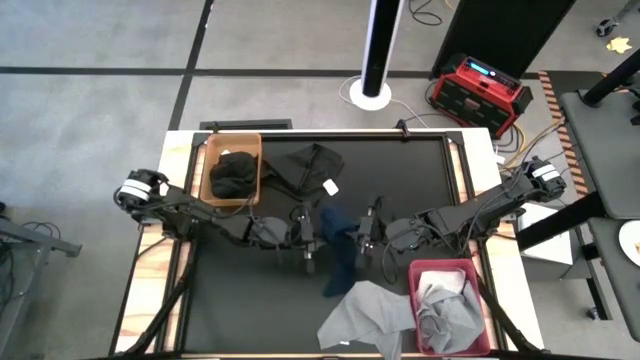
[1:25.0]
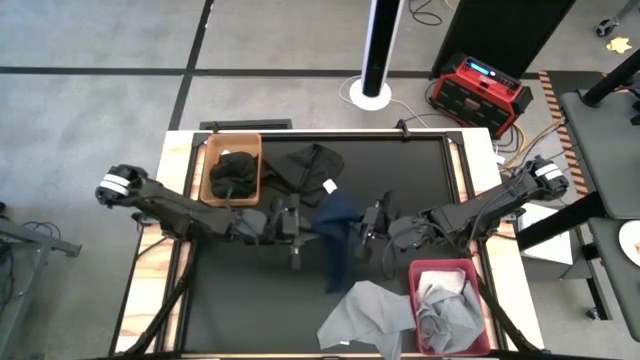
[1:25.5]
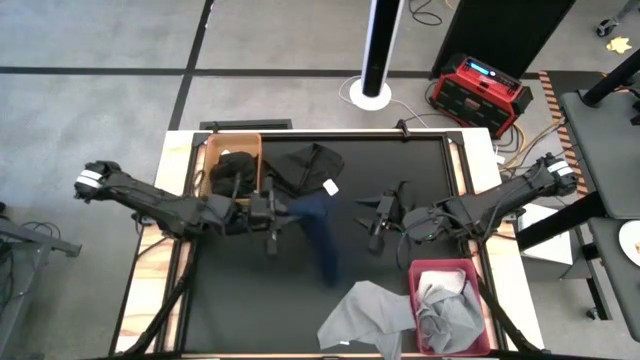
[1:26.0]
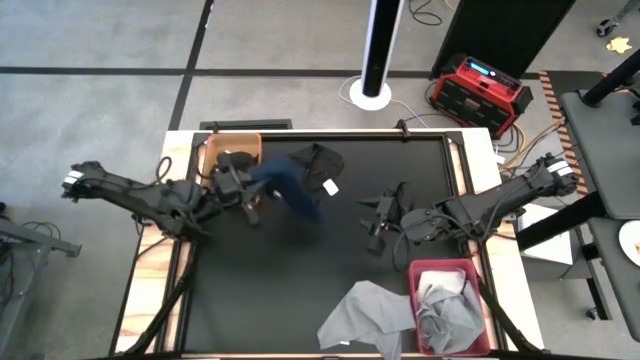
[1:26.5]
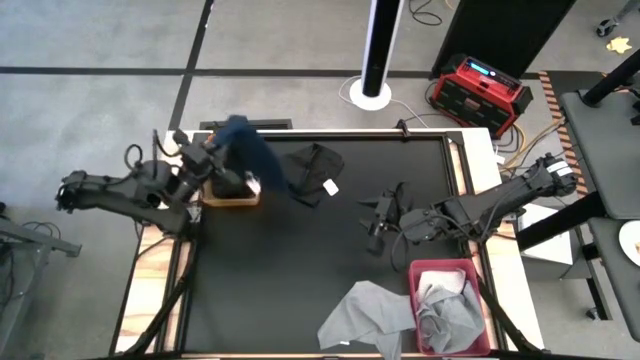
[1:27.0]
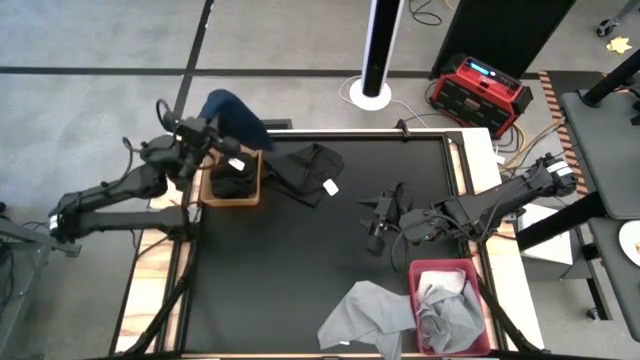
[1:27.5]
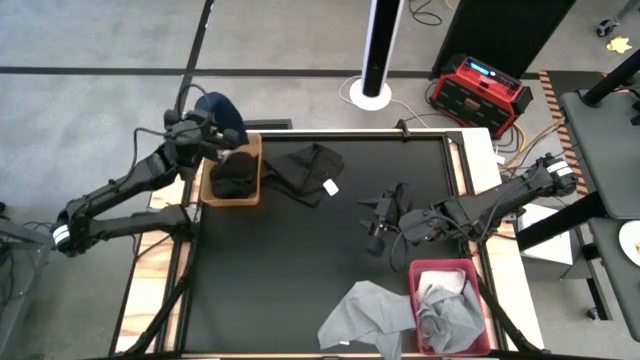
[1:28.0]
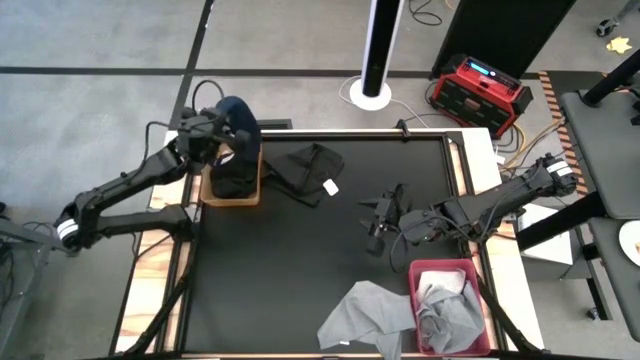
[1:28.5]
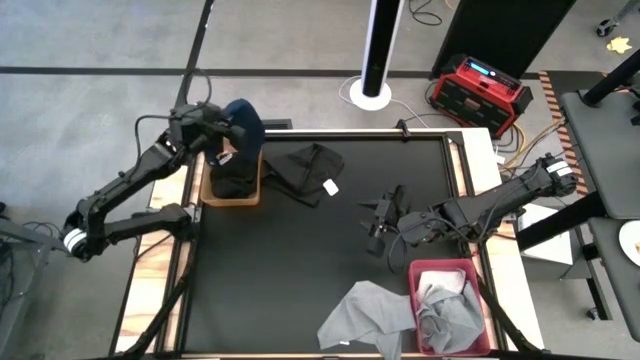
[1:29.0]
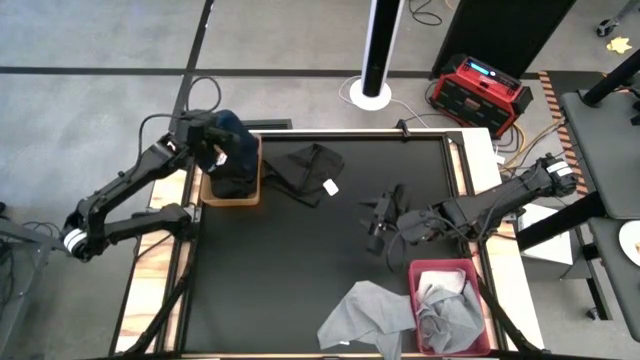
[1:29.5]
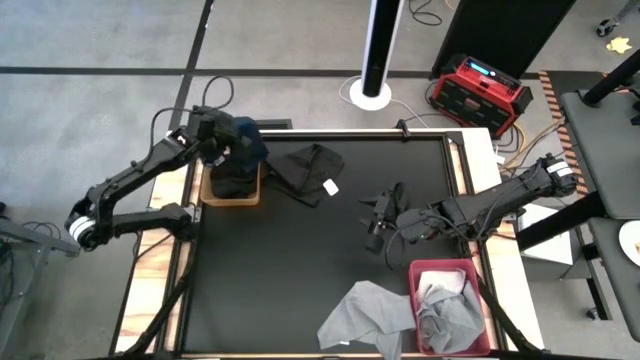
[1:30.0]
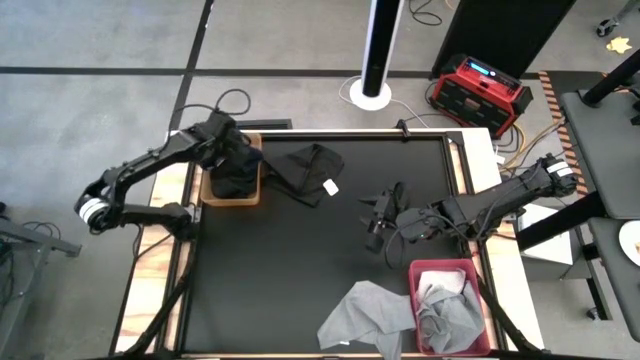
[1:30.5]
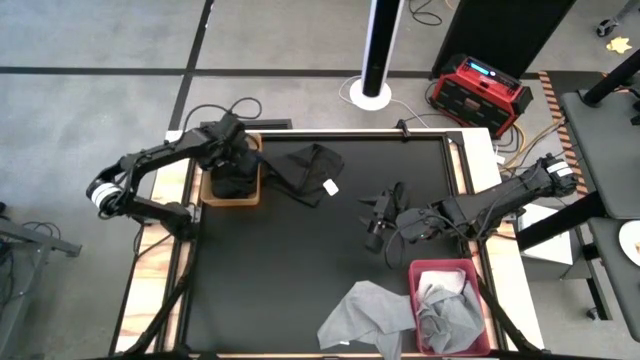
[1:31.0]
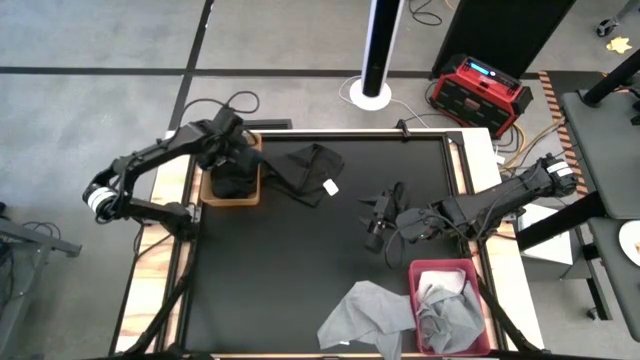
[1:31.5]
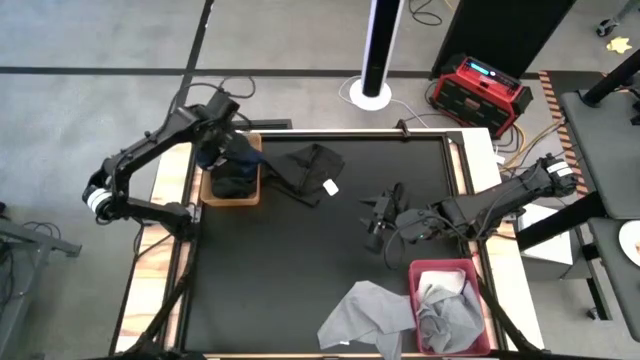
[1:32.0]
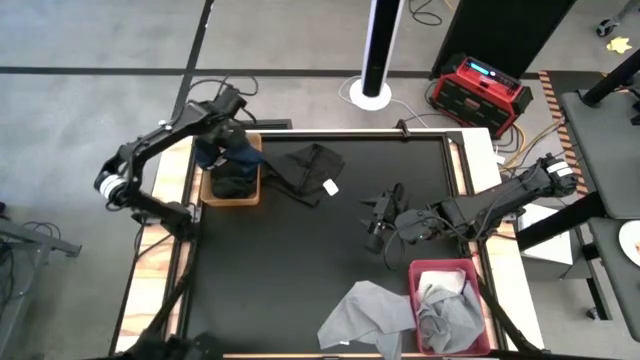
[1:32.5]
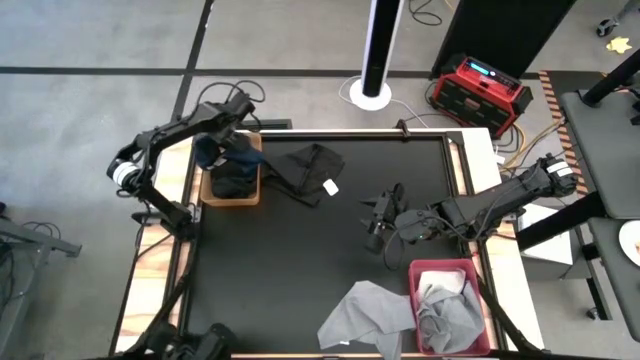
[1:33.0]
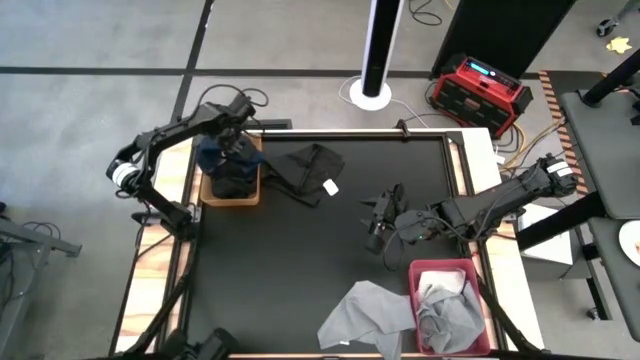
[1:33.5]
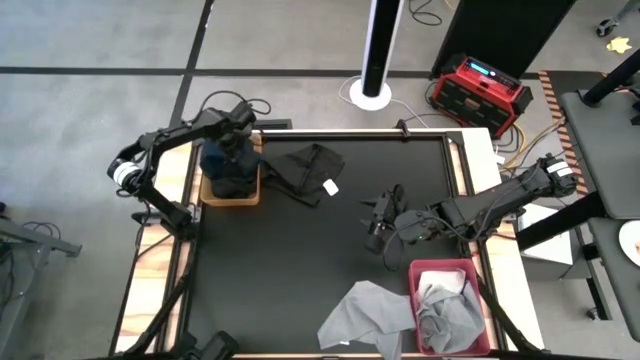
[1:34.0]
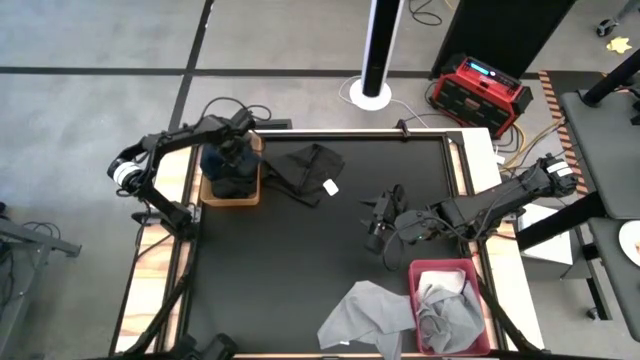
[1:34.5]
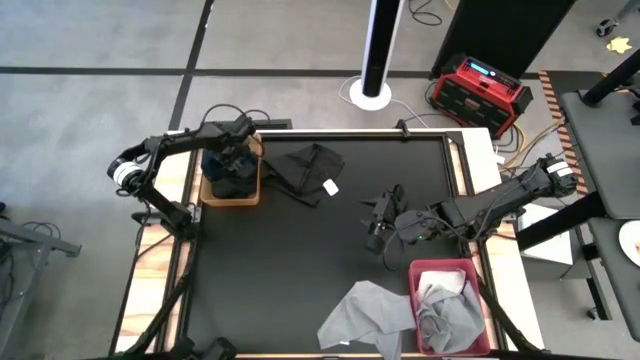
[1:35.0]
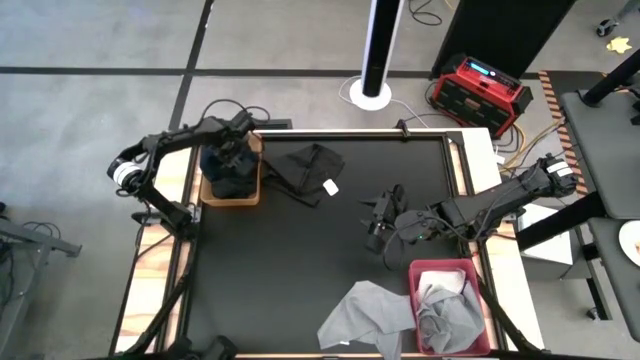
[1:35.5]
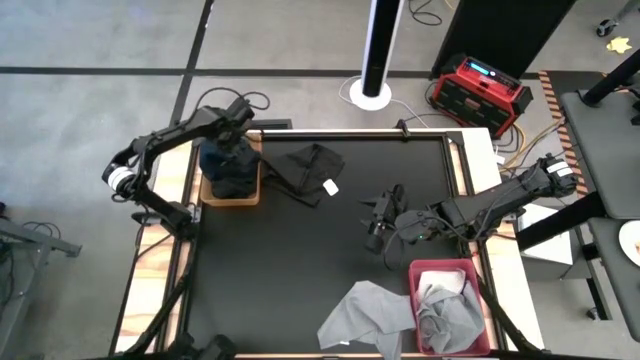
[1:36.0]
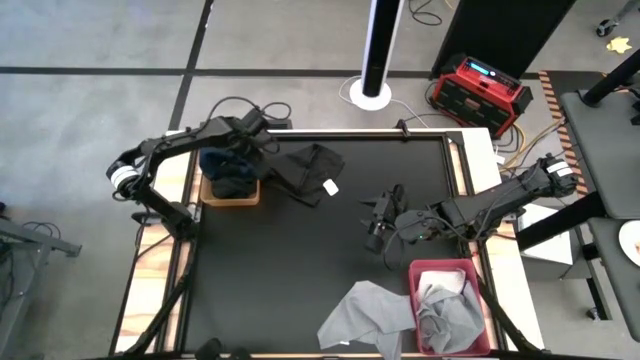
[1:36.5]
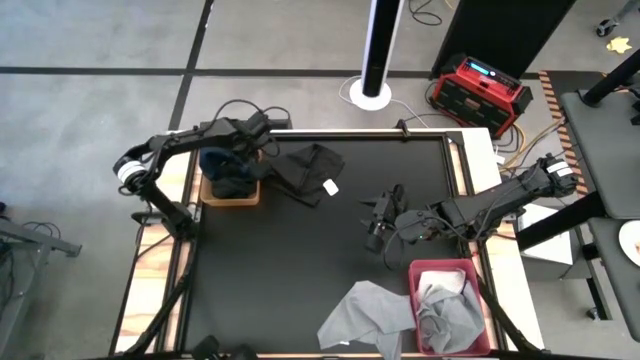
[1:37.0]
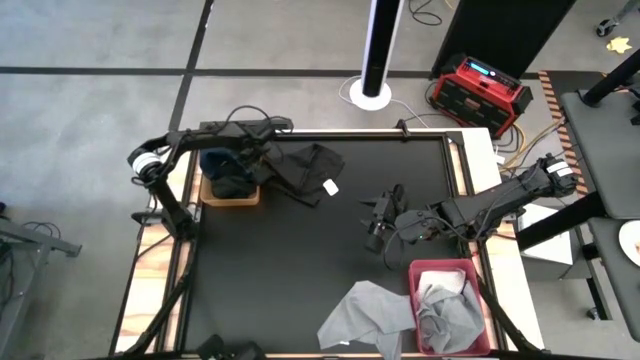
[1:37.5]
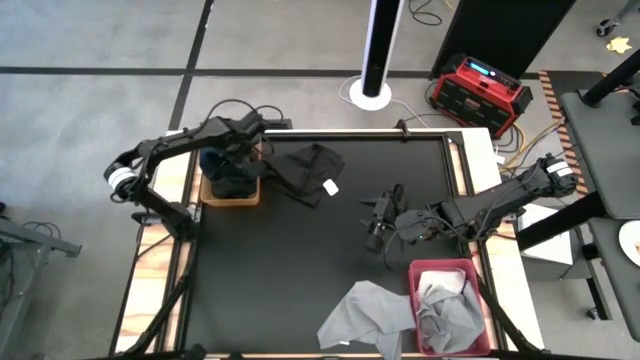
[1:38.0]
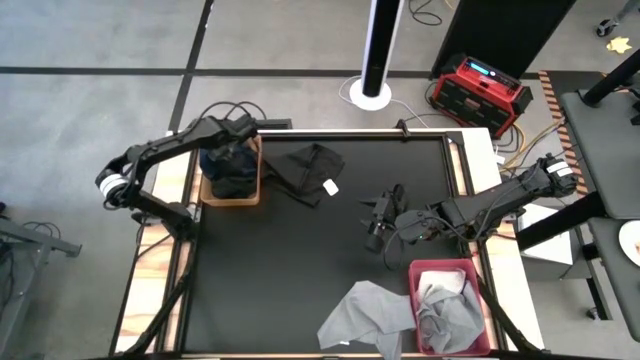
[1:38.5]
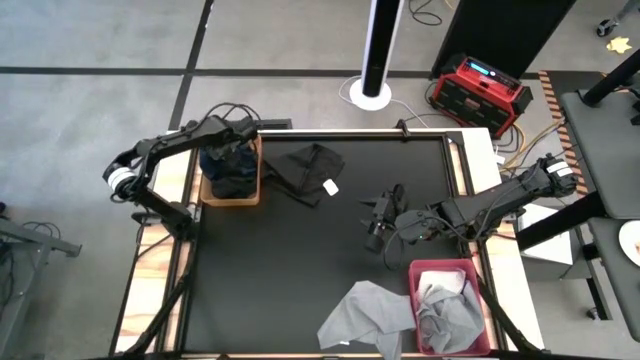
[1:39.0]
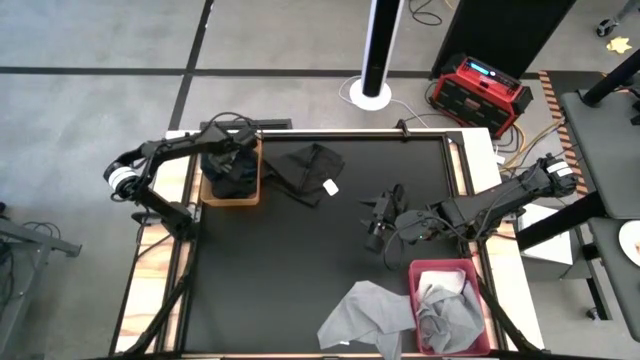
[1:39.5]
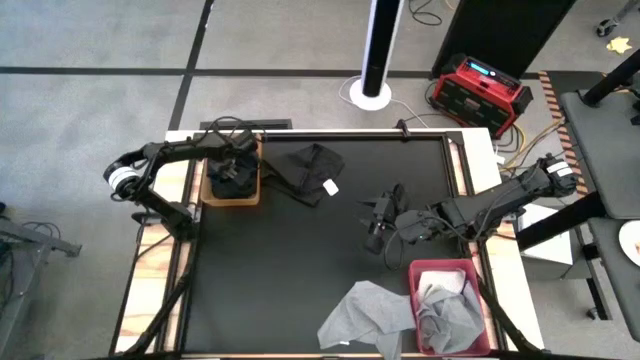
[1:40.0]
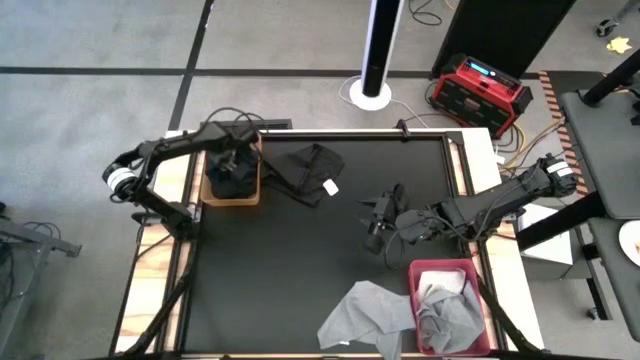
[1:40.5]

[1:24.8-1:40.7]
Task: Sort towels by color in basket
Put the dark blue towel into the orange bin

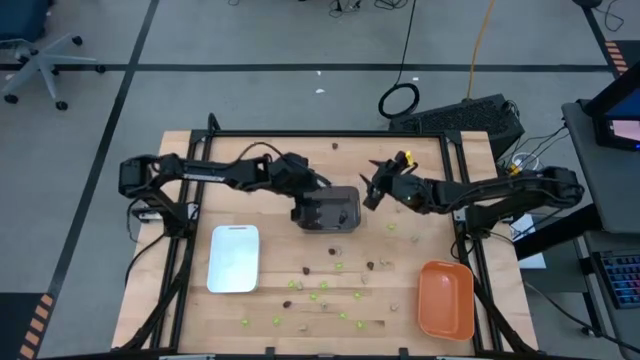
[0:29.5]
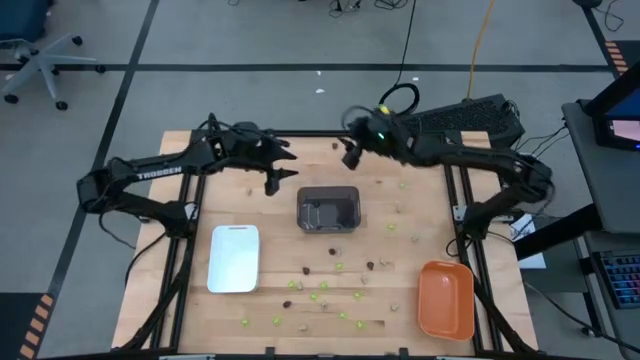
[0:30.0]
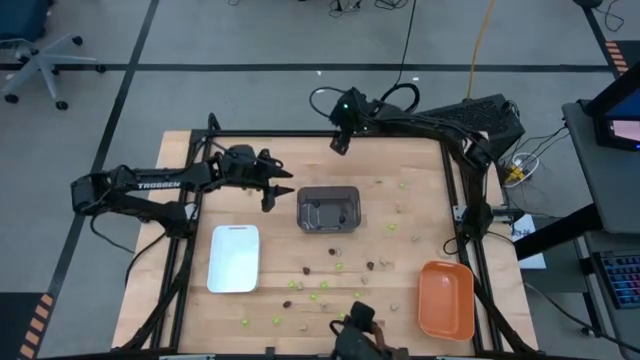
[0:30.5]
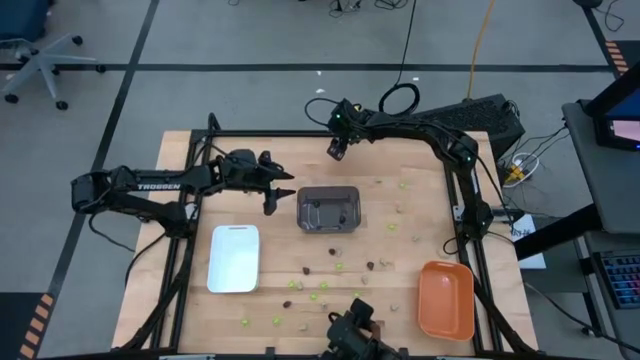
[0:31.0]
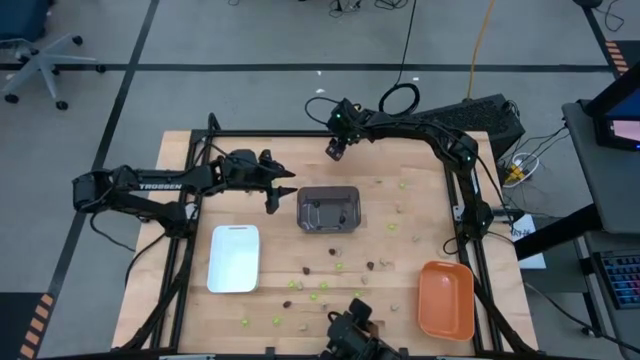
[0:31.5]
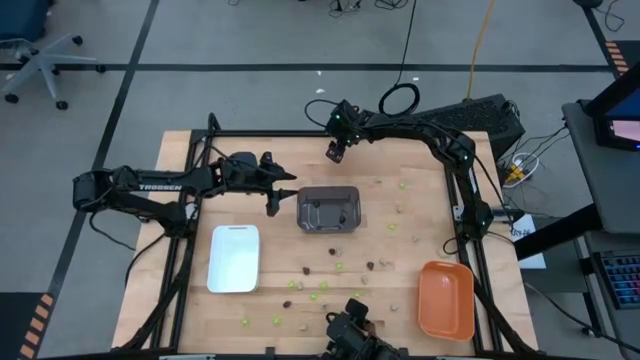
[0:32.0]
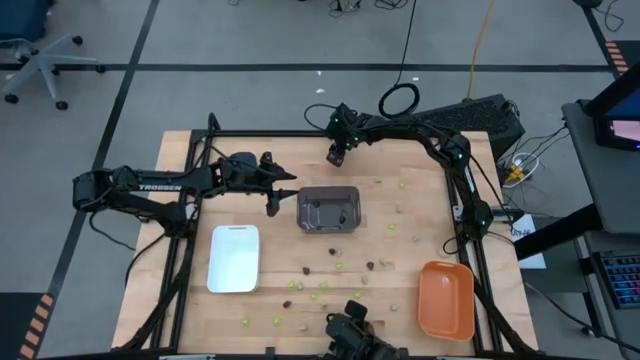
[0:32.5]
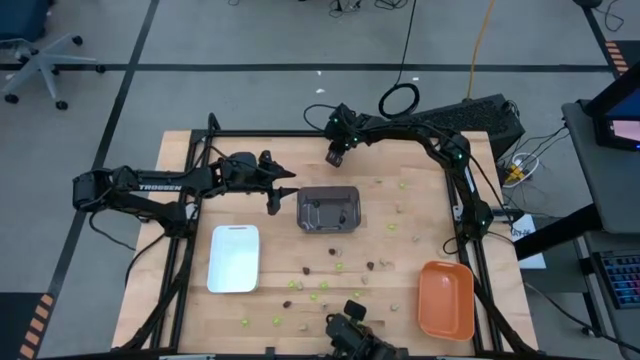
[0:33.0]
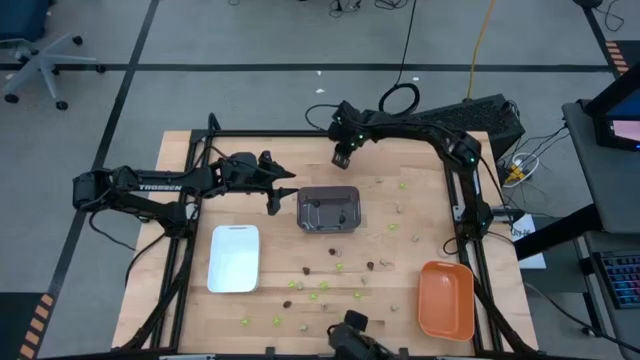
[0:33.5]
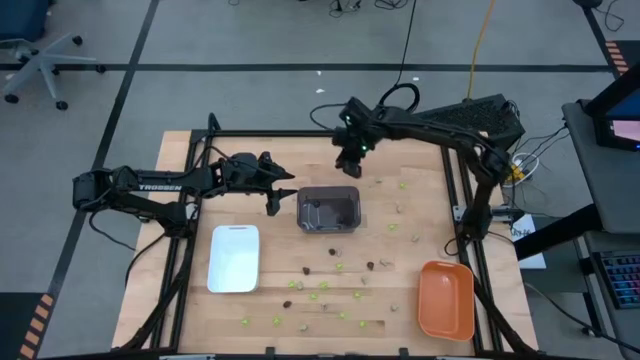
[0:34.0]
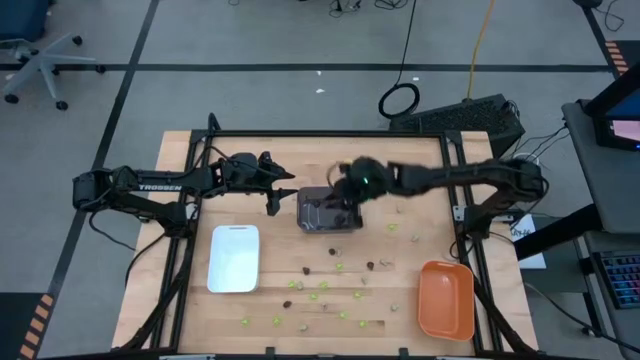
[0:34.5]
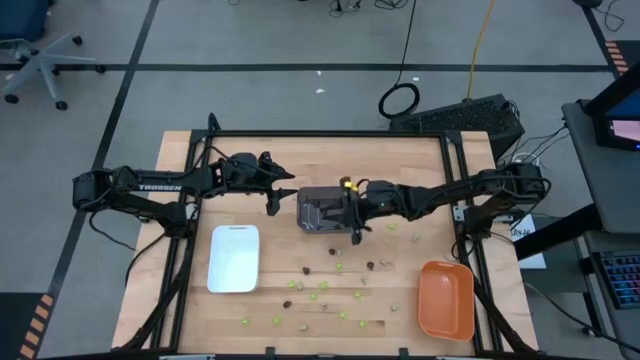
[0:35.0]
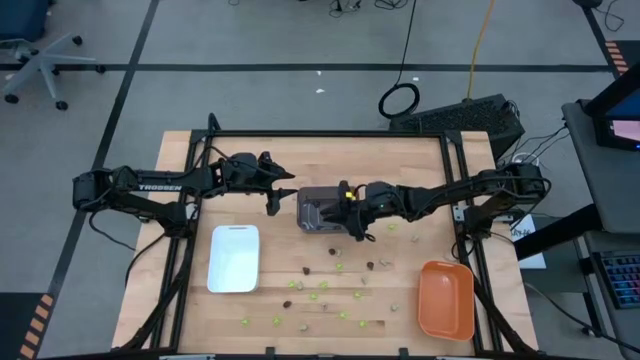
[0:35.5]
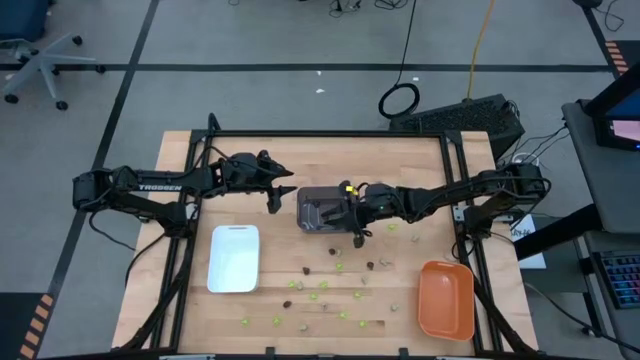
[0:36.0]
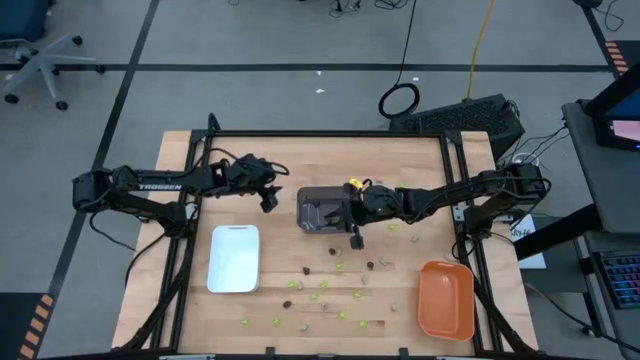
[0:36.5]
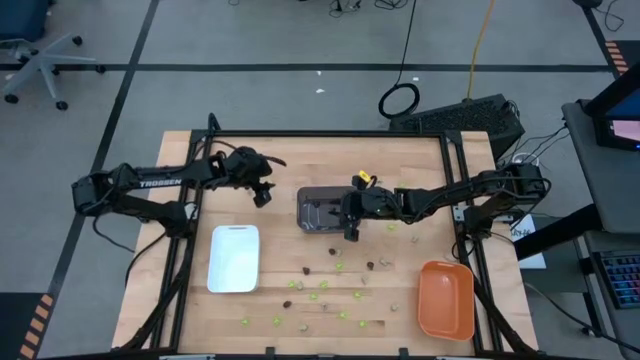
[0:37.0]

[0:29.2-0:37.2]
Task: Sort Halloween decoration
Put the black skull toy into the black bin
